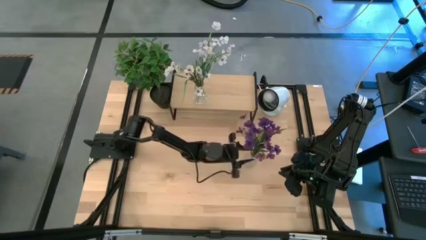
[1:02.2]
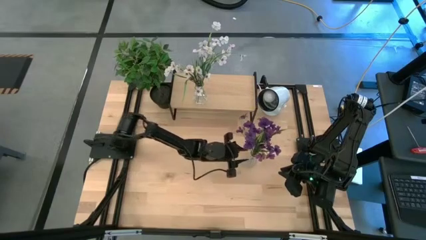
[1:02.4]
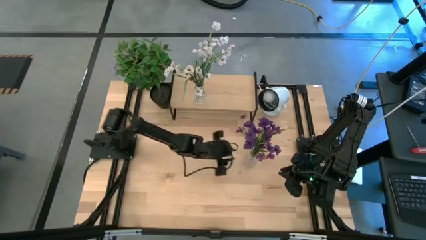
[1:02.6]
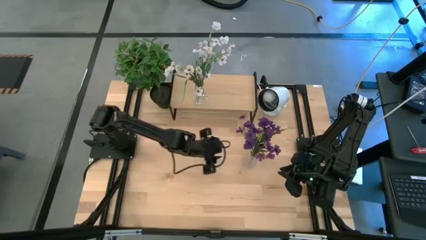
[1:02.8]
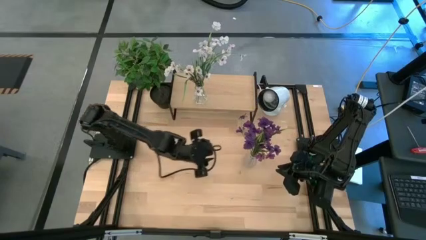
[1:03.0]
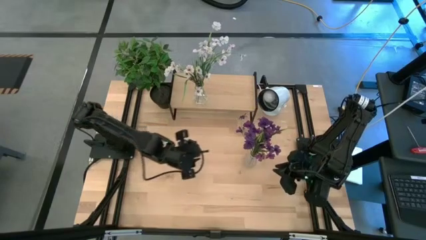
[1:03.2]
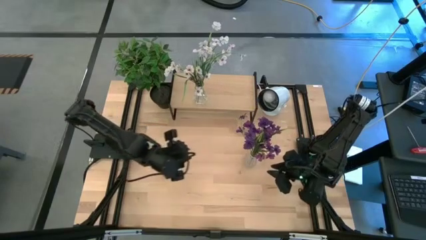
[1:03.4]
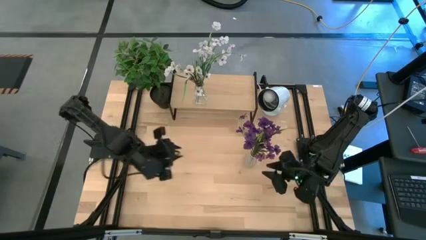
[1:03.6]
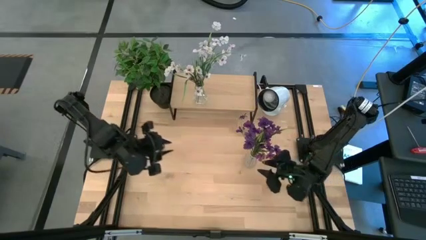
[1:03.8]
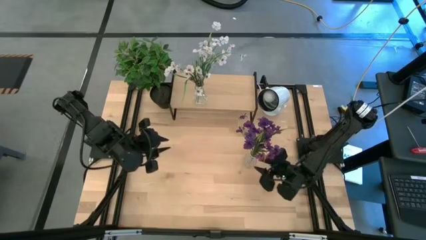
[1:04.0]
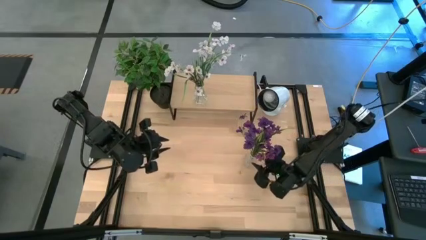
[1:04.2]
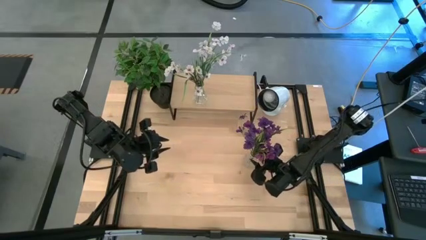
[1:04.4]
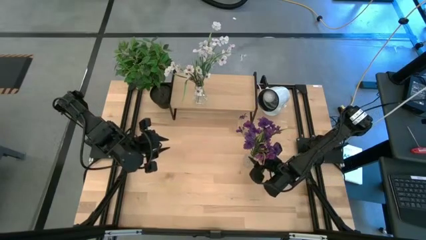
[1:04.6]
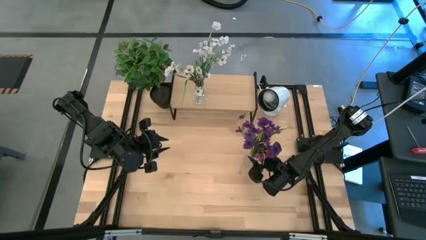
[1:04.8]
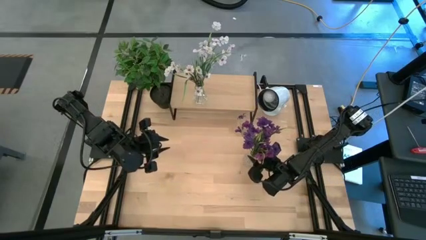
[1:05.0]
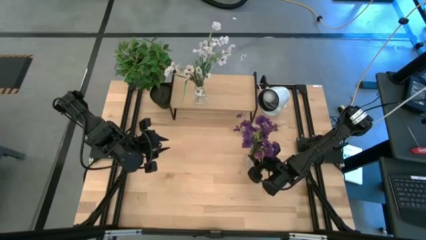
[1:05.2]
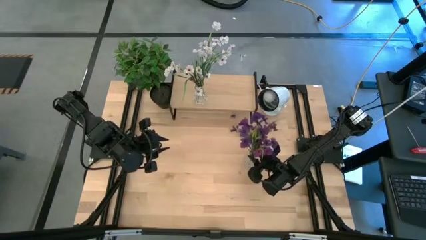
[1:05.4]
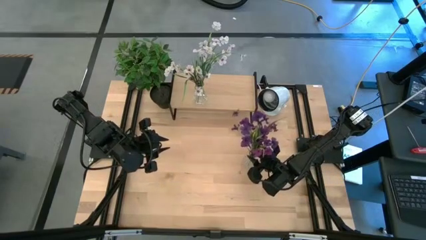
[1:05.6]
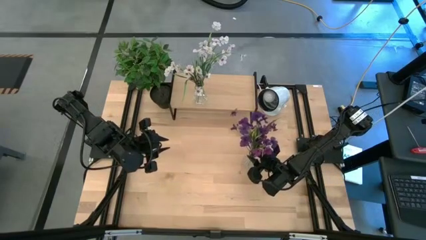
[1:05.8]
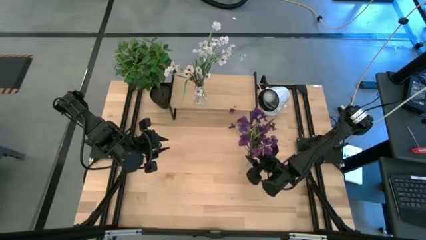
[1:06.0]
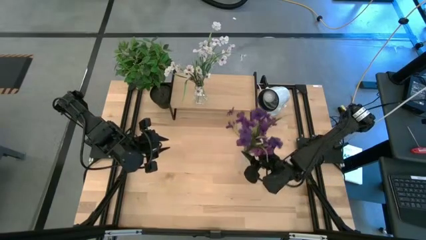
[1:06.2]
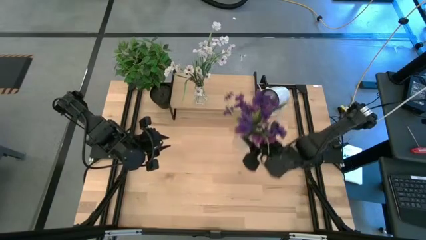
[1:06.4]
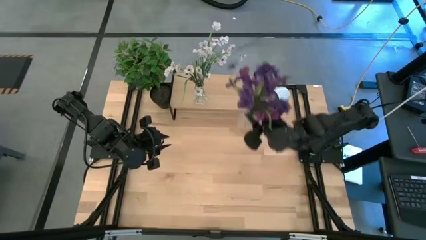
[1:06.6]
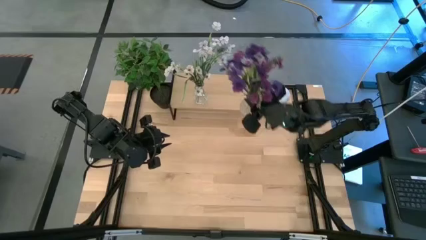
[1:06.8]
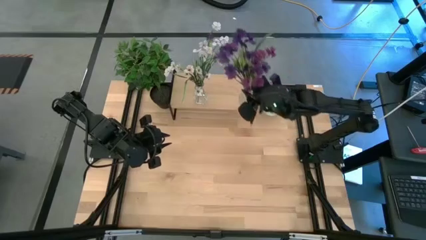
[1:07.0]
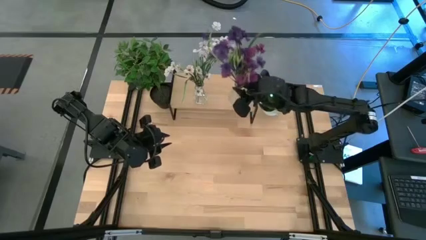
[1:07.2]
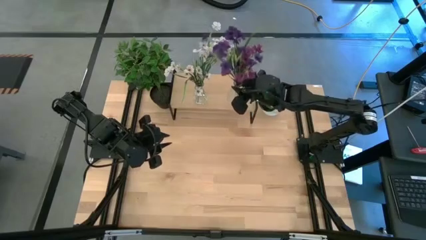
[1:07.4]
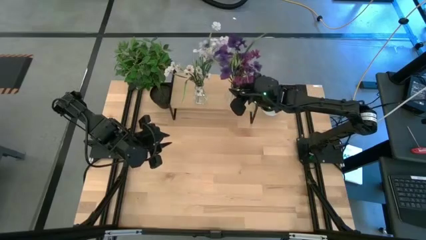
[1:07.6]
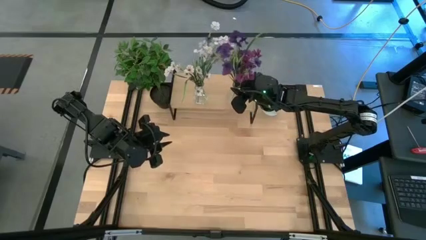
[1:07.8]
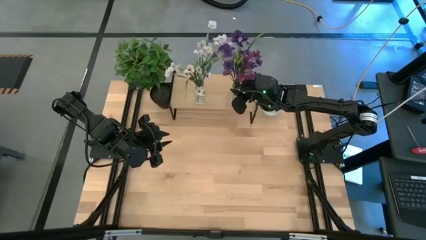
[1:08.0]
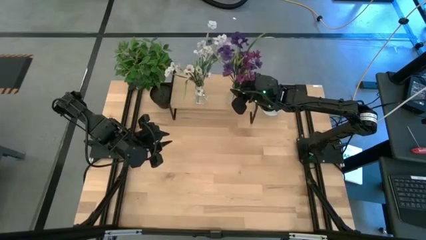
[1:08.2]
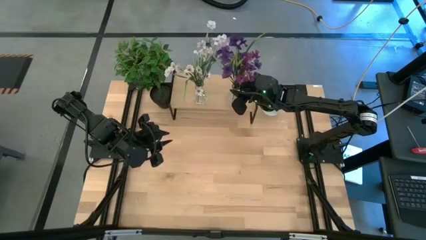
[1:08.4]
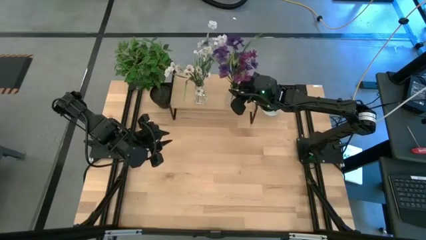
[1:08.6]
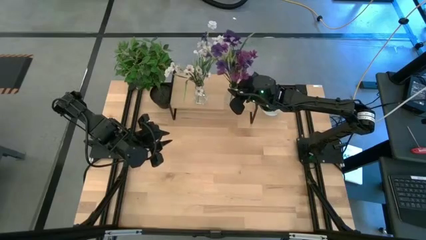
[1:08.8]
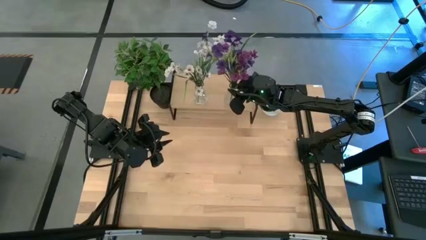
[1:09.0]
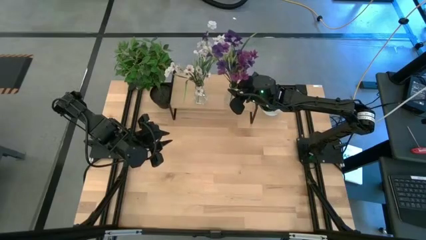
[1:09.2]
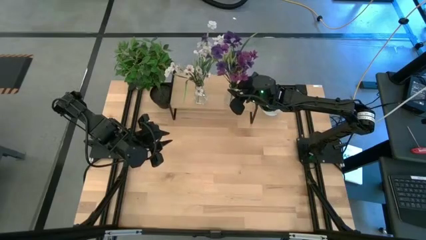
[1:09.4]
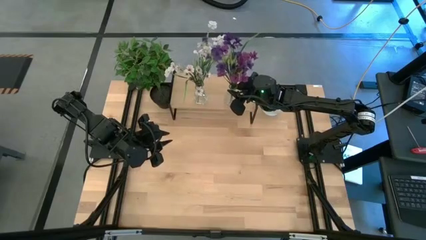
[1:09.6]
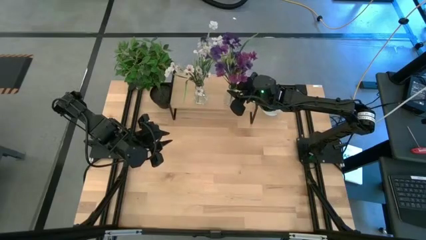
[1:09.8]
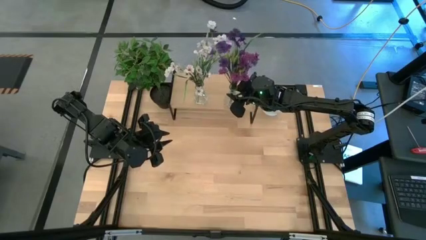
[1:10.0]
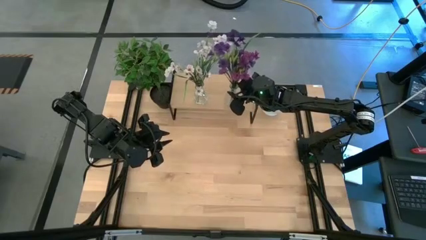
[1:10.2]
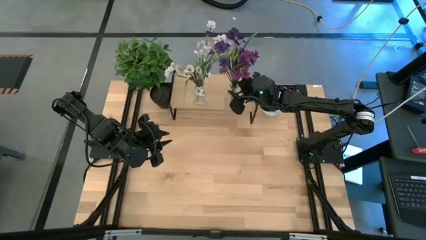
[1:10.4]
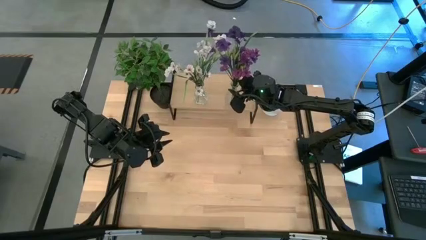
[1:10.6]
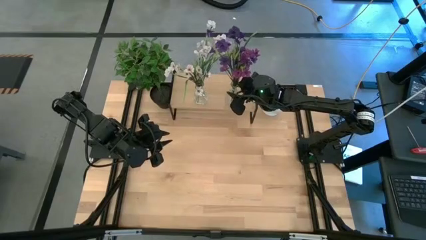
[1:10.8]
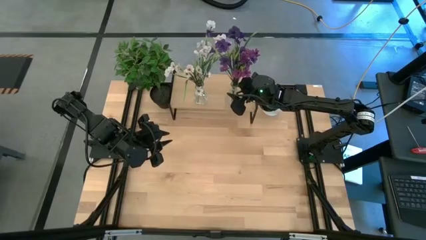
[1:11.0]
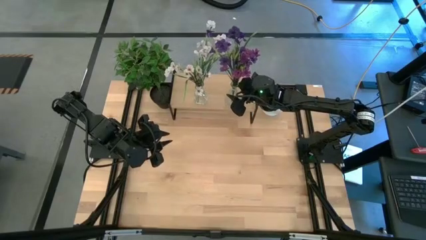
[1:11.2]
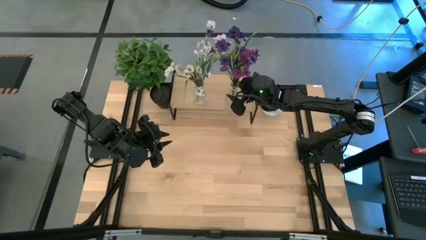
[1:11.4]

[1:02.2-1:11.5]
Task: Pick and place flowers into a vace then onto a shelf
Put the transparent vase on the shelf

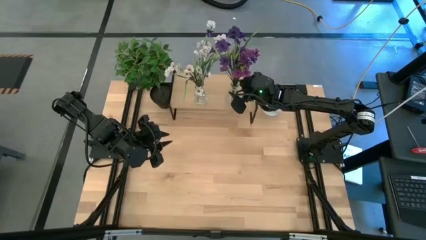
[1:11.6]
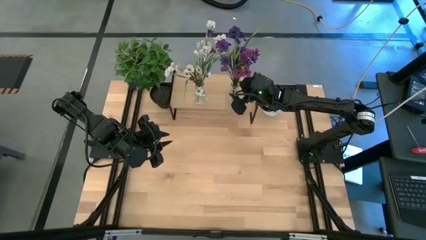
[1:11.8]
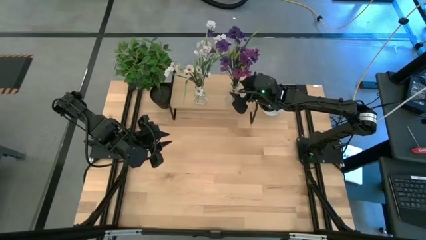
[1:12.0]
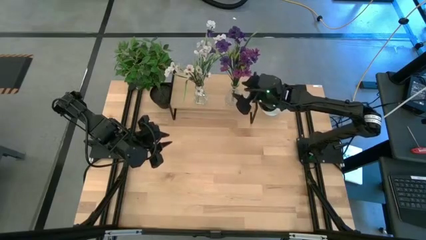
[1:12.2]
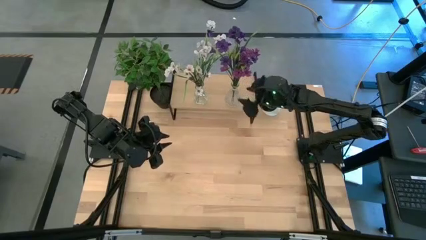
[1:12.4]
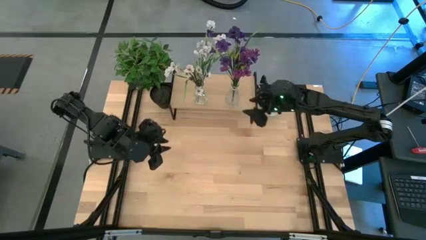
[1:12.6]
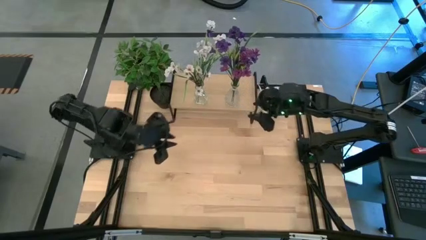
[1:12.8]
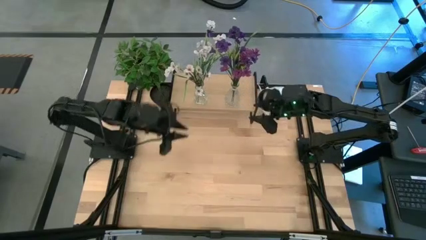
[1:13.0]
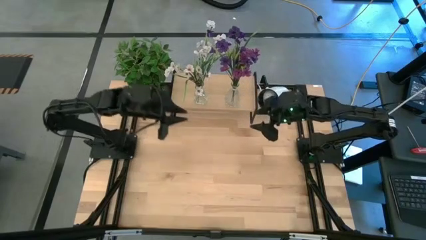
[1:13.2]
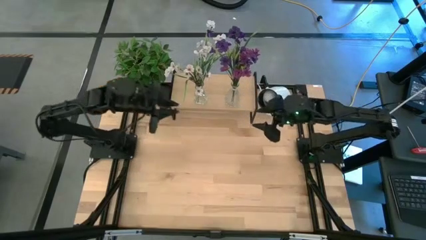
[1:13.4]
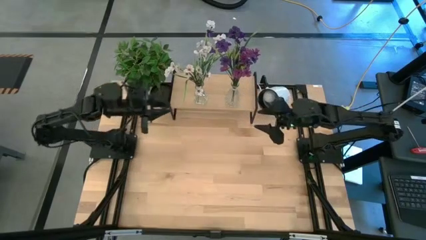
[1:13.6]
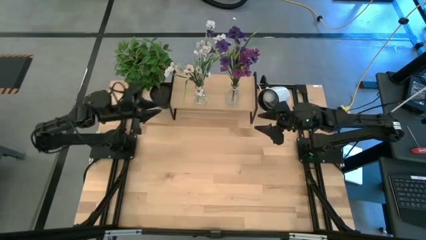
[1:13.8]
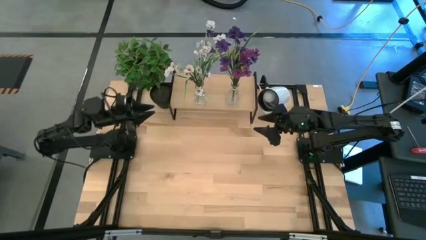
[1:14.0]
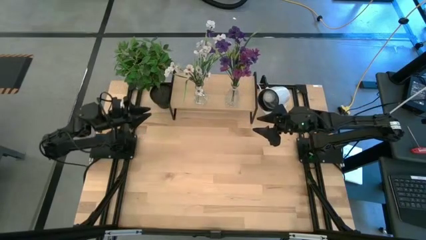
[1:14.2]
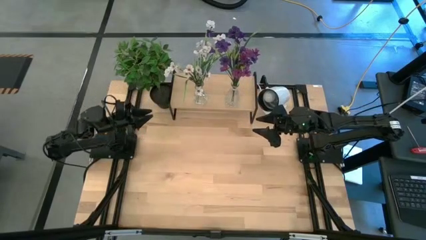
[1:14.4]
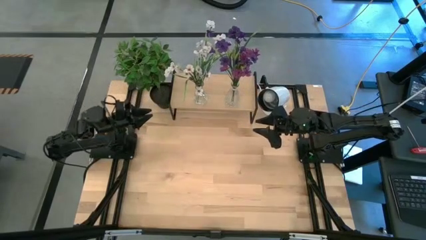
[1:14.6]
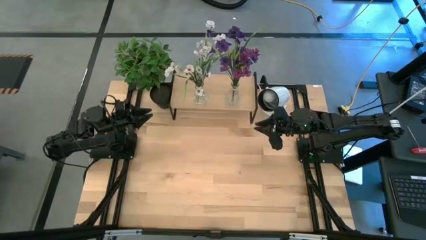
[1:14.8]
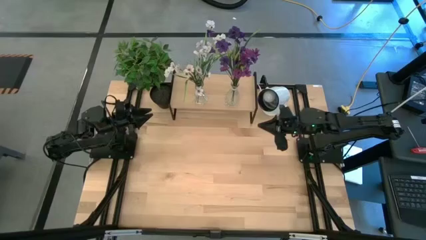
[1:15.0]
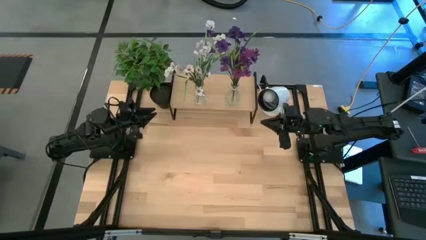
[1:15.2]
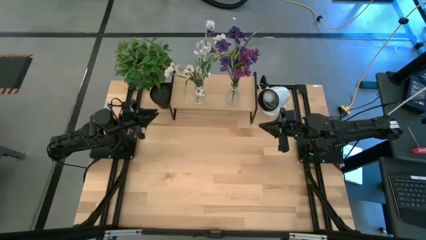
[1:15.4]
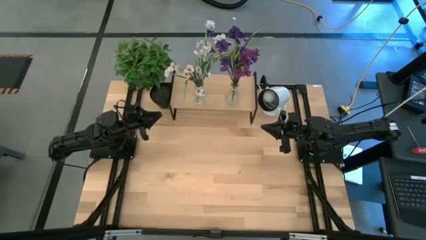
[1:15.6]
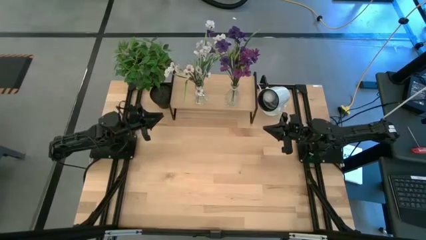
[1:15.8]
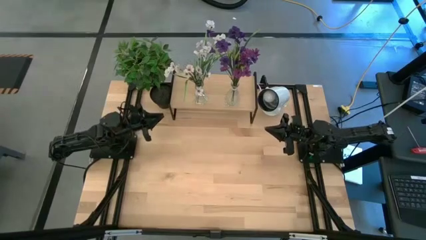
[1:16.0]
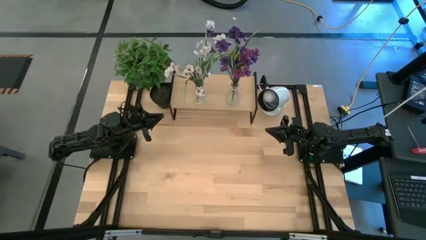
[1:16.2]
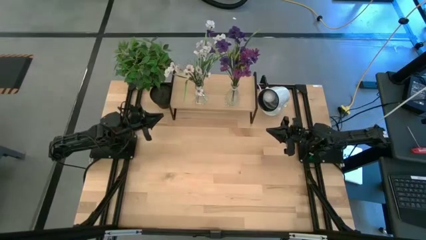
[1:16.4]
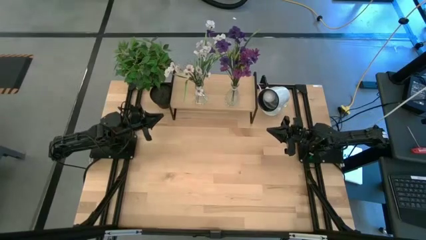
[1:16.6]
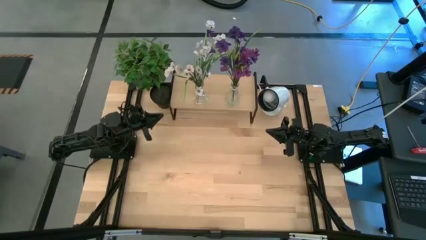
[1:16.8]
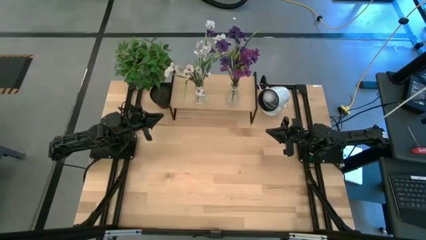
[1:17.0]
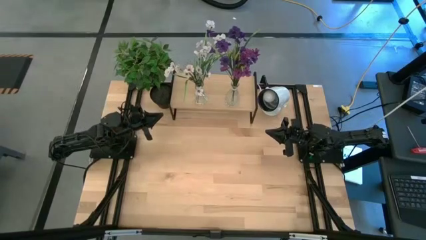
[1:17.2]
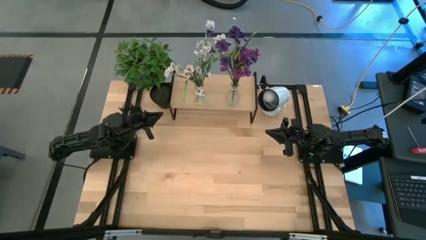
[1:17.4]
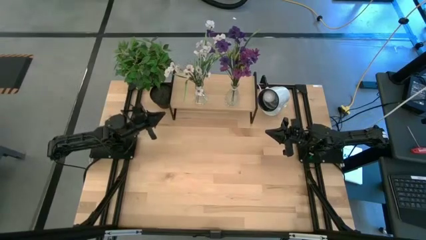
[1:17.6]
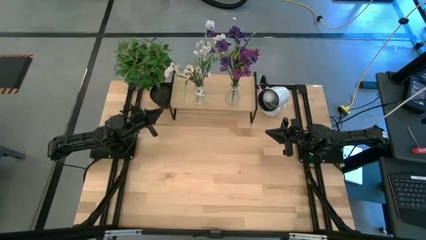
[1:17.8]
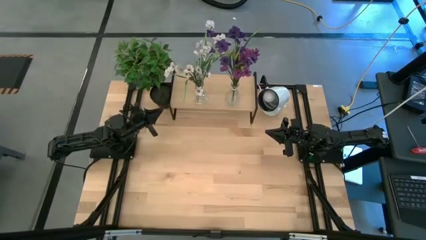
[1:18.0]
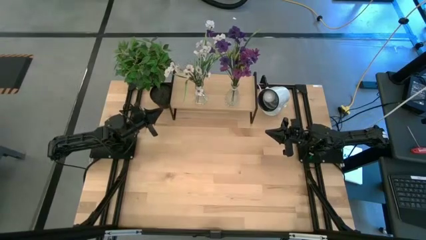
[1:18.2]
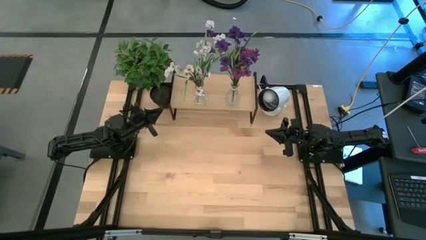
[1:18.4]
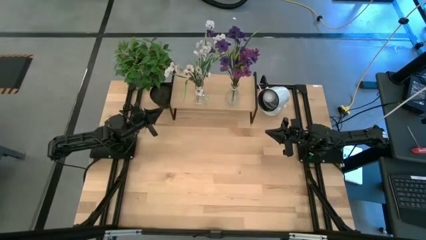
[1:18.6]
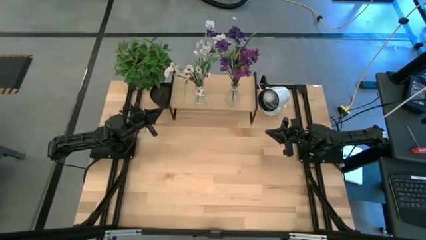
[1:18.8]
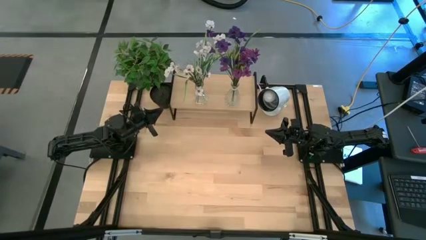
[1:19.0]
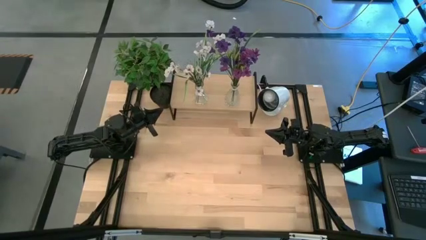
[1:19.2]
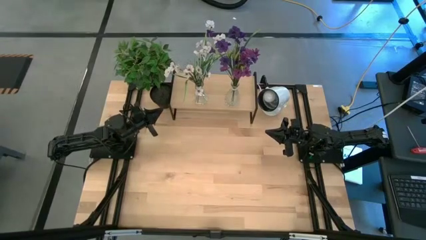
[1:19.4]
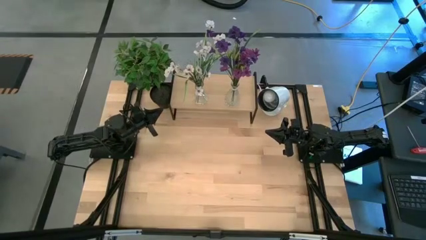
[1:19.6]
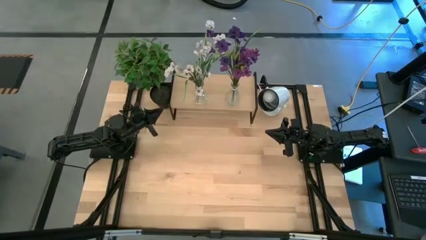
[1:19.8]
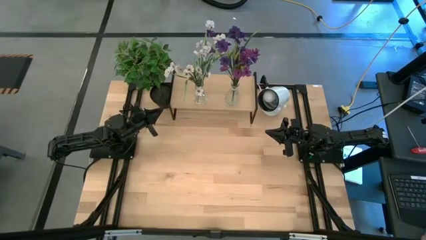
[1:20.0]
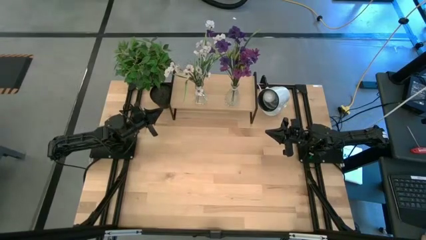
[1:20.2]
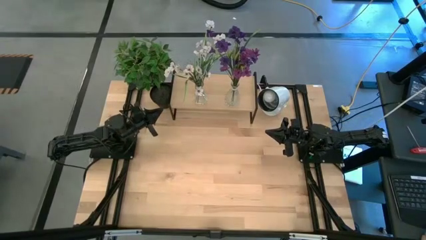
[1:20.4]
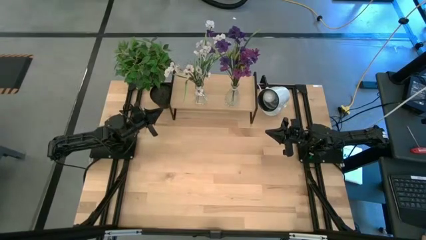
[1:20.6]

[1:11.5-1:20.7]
Return to Home Position
